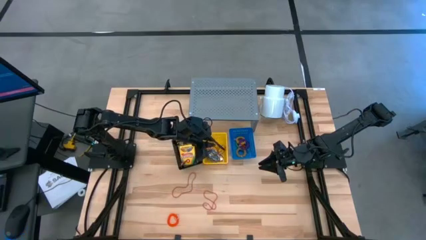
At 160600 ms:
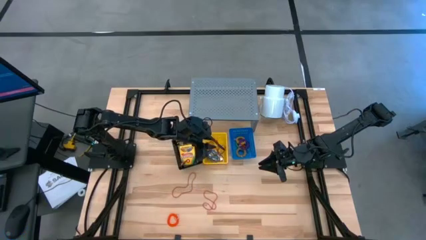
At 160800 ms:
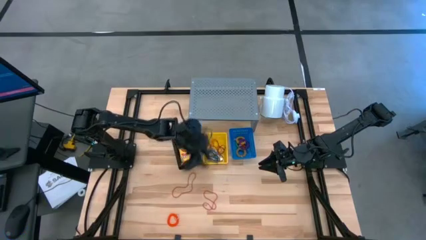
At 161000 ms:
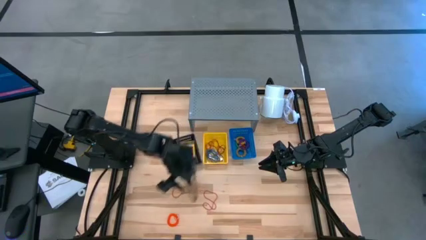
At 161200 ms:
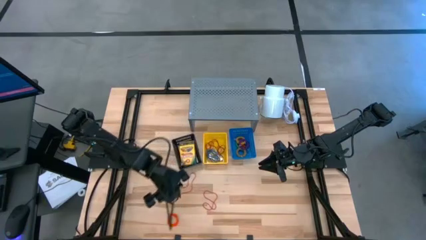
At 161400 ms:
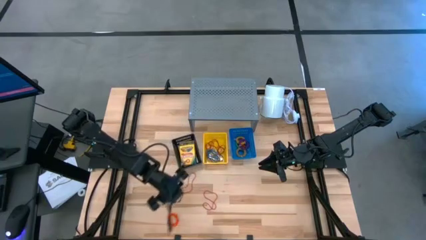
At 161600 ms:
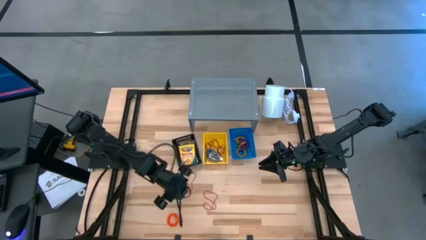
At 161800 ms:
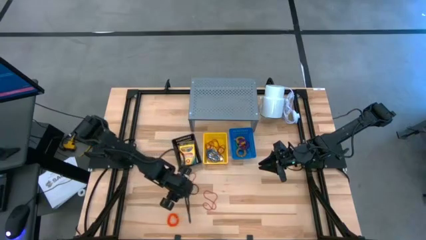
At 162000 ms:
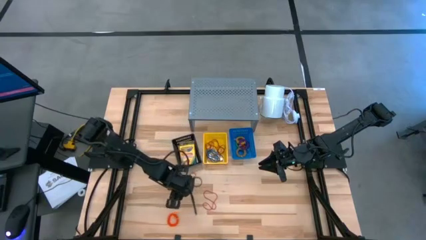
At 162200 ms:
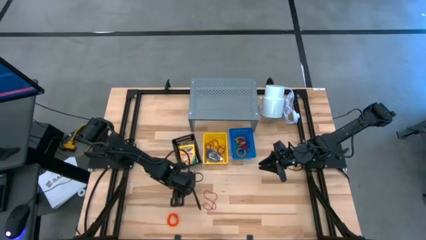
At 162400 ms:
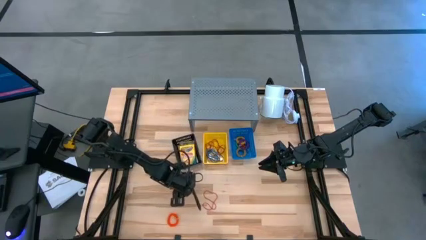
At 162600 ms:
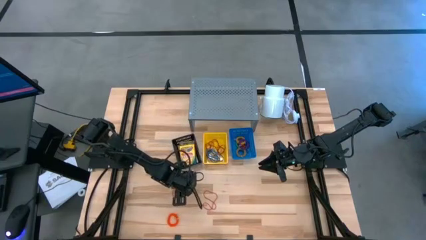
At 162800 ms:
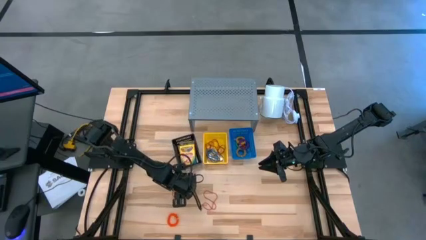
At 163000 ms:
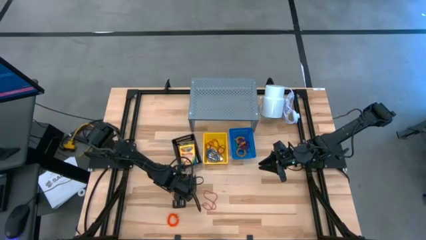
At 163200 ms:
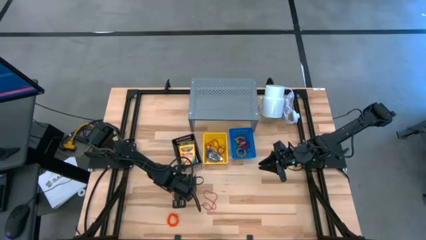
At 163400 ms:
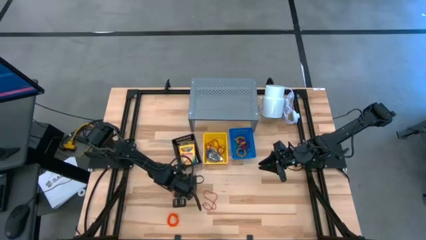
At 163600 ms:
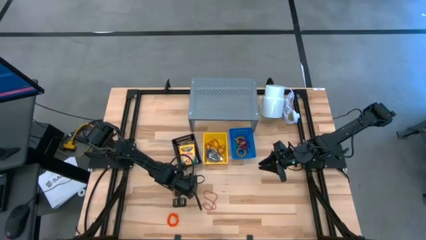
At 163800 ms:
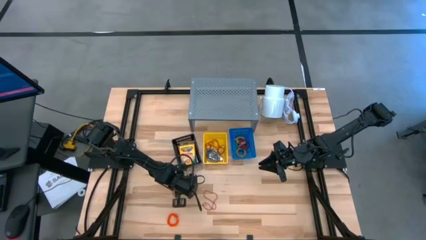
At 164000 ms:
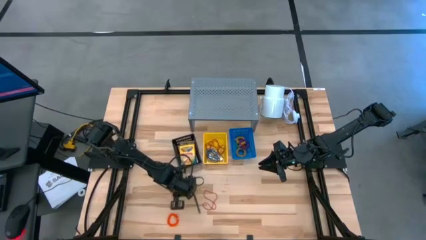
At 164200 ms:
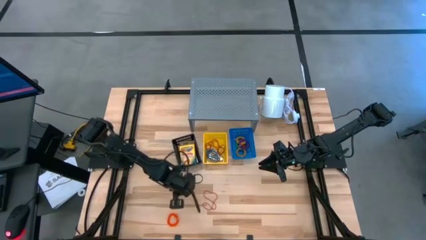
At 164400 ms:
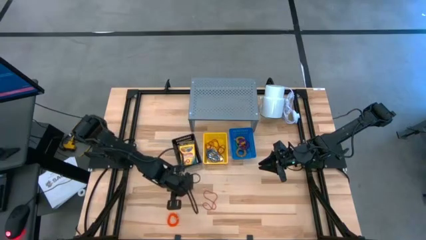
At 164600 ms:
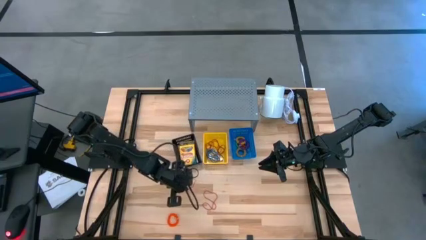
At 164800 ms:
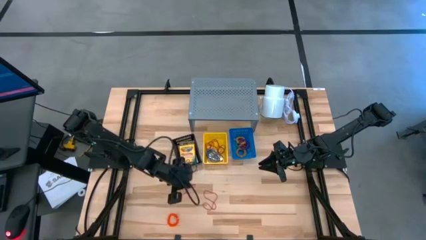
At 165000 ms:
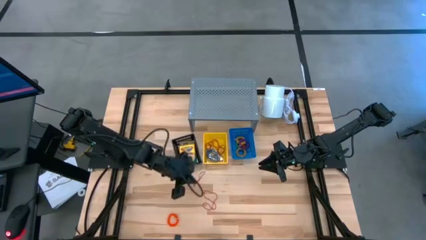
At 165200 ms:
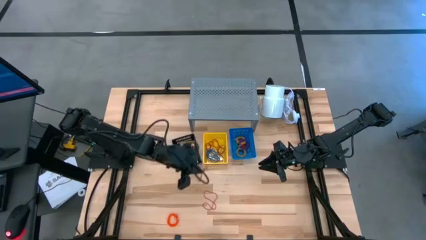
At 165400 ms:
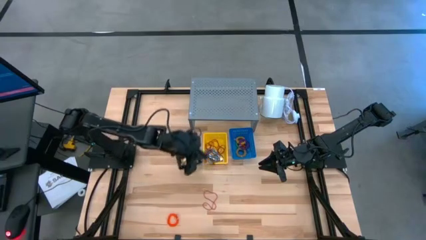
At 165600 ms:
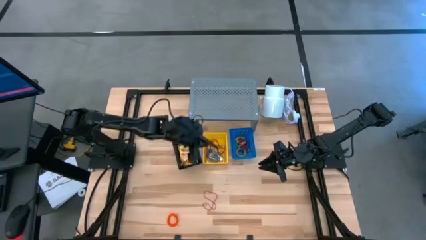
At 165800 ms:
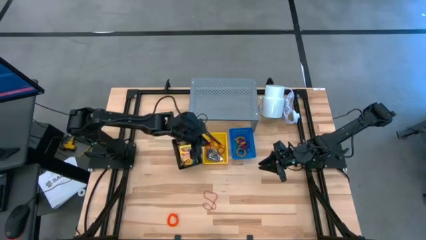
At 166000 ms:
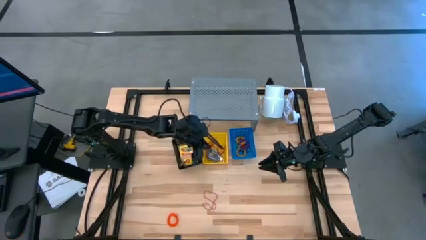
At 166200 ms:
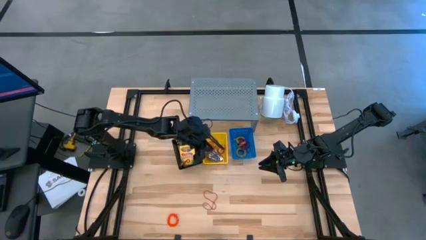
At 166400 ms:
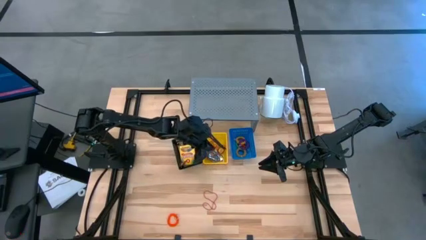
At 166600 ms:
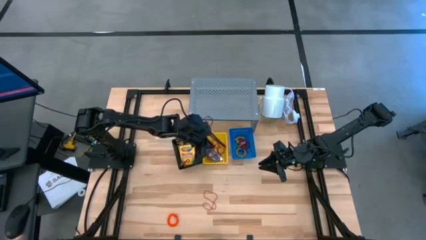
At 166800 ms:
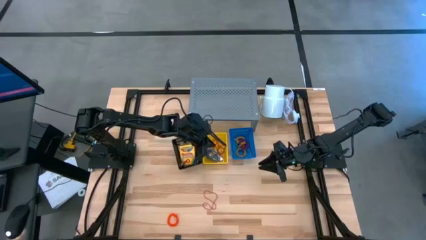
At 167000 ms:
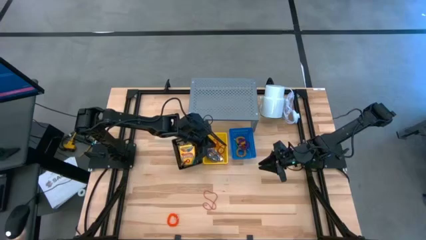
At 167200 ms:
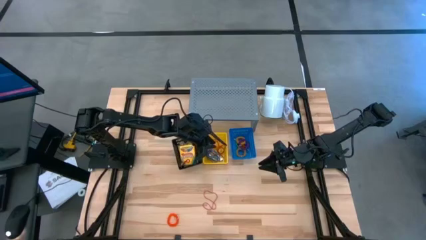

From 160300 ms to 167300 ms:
Task: Pick & Place Office Desk Supplies
Put the red rubber band into the yellow basket

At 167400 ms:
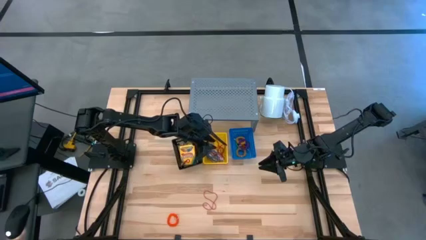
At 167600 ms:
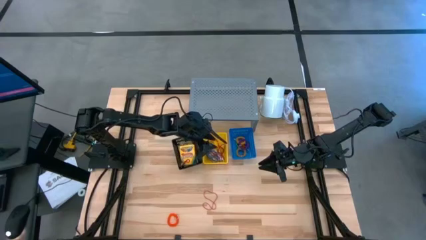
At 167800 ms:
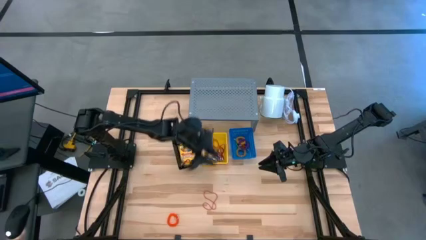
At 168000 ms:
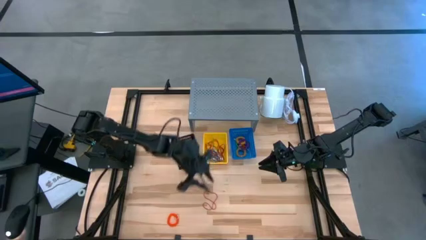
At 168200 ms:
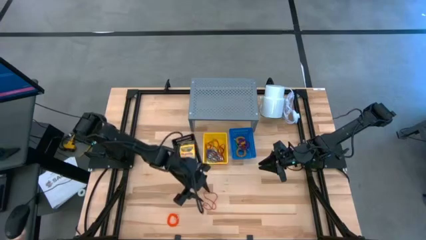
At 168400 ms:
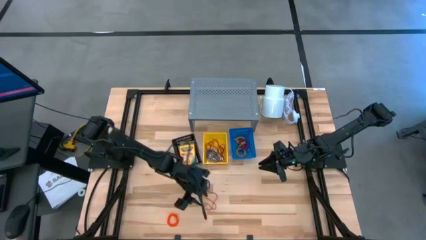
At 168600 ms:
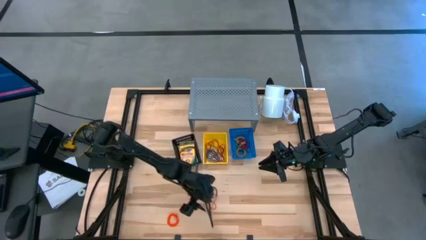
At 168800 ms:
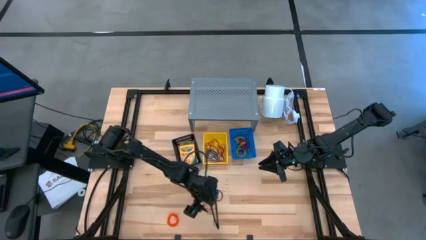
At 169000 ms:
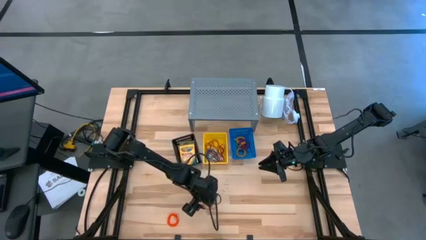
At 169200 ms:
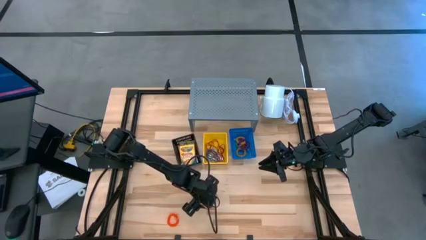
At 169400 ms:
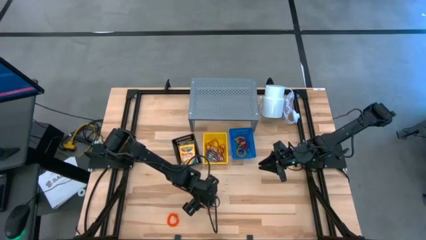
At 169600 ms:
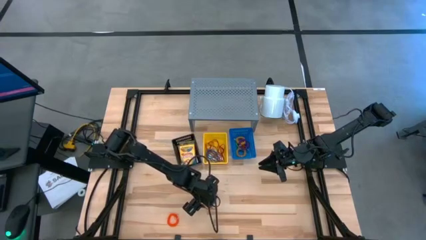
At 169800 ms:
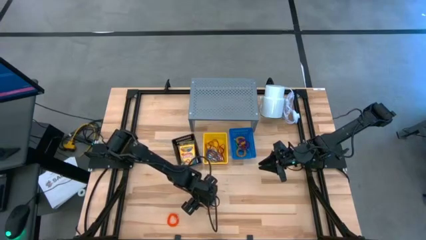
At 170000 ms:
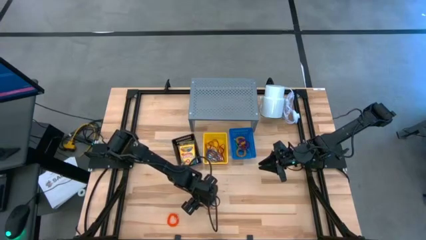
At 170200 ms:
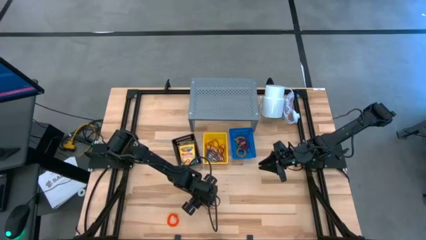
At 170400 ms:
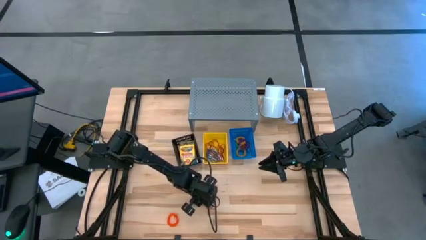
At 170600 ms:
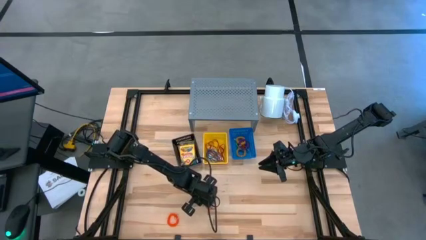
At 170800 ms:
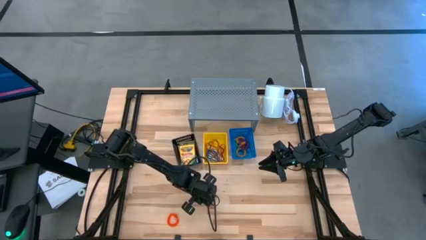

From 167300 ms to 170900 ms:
Put the red rubber band into the yellow basket

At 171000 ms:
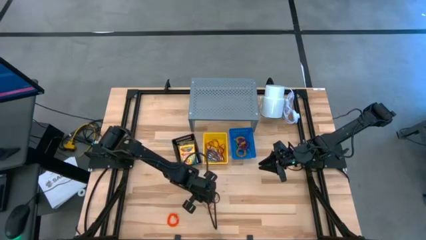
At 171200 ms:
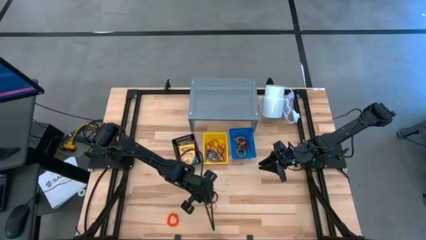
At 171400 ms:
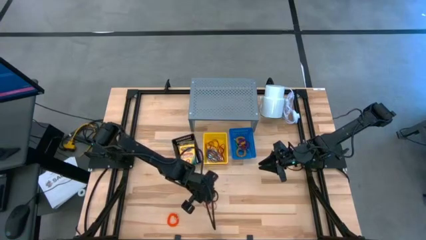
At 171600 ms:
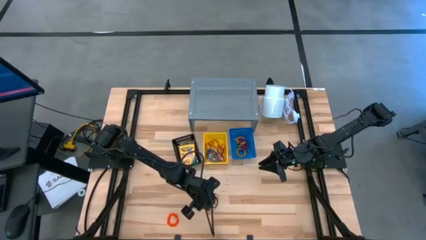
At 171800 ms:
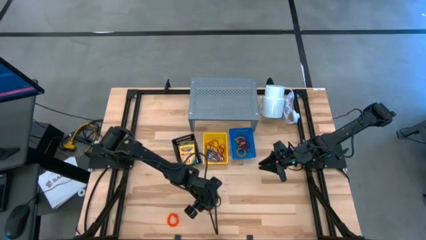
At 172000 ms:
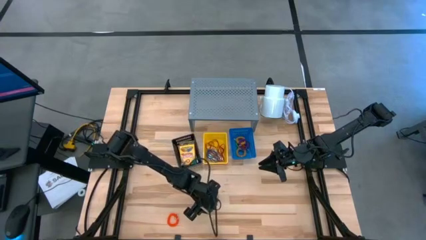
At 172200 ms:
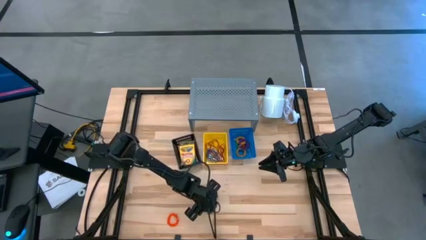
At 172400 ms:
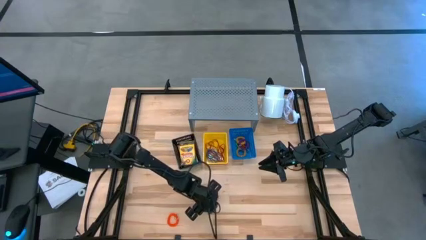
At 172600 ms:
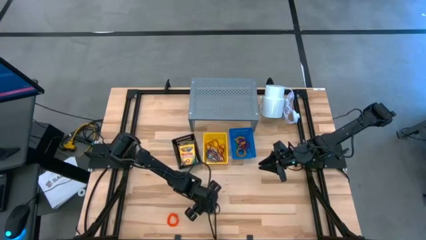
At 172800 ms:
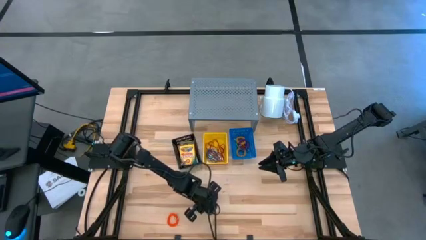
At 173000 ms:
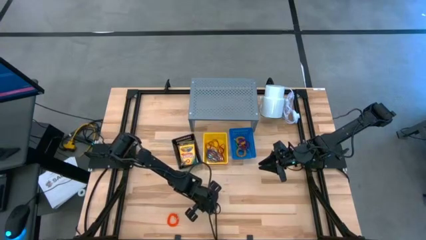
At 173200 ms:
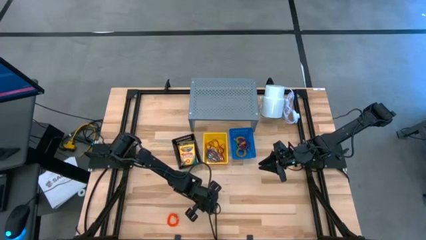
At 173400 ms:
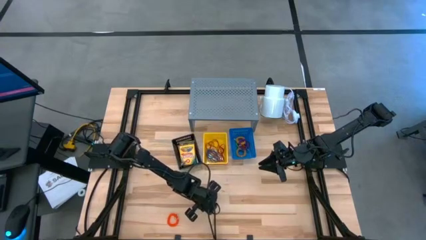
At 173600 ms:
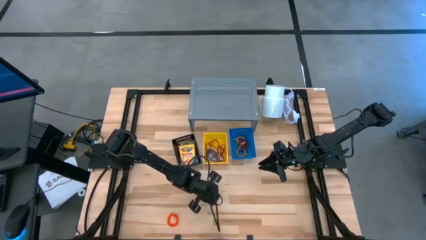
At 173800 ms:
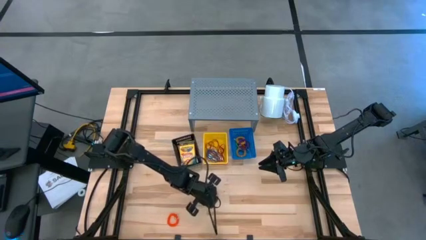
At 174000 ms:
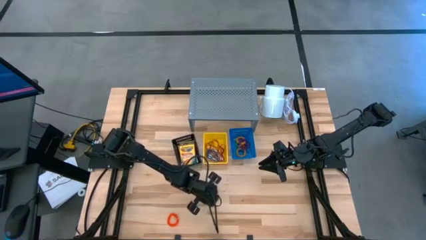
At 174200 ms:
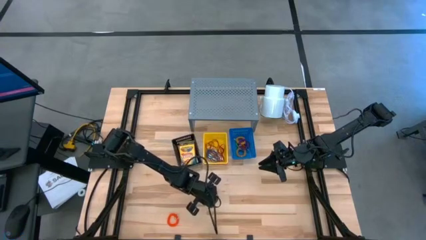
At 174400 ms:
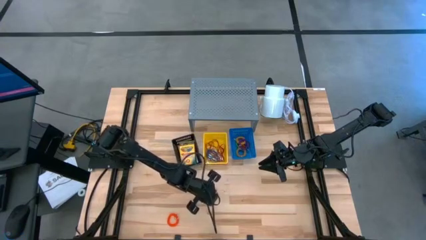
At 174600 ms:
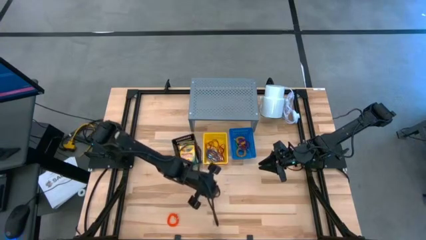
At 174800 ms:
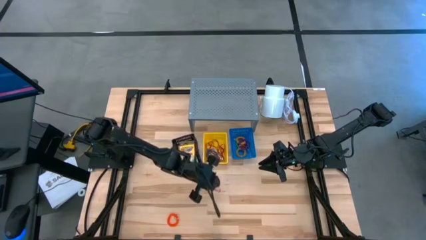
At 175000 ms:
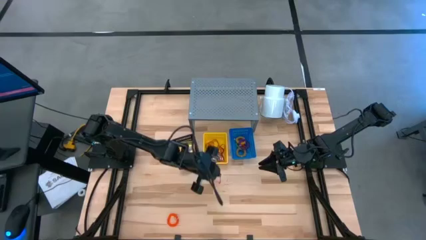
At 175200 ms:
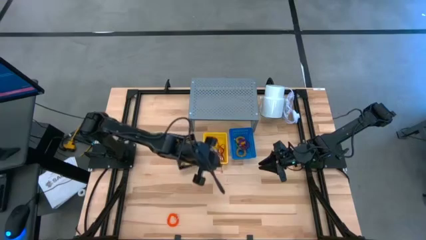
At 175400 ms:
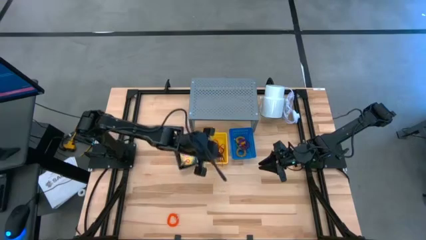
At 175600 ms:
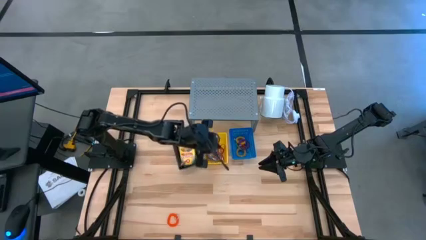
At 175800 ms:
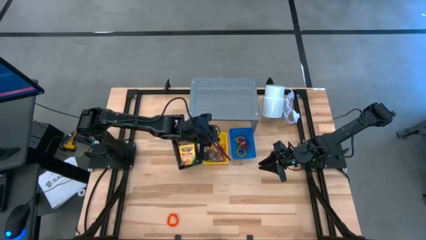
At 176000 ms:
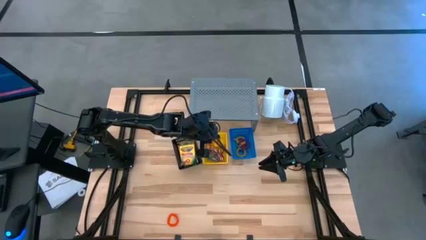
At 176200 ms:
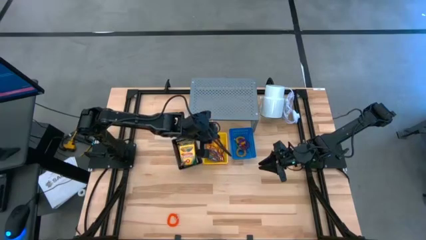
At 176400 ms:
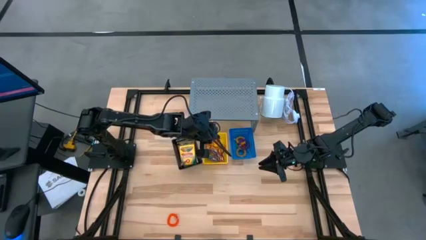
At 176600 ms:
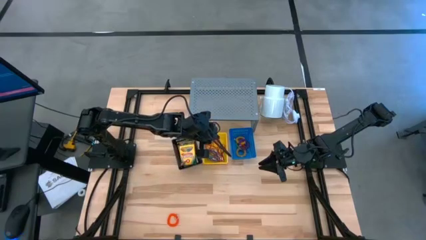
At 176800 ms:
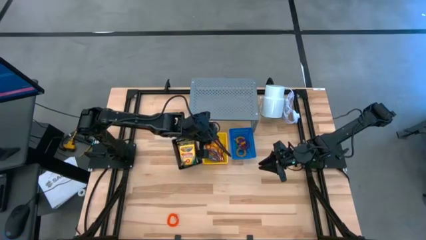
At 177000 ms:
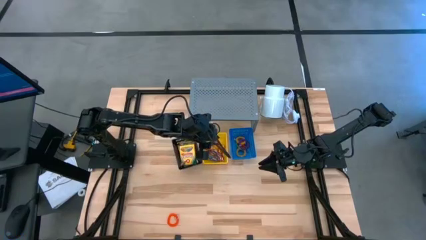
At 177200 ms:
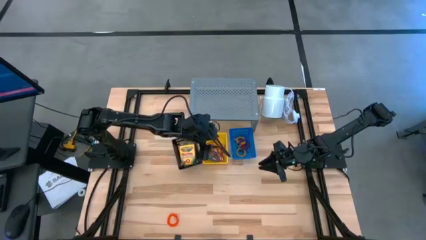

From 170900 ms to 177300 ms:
Put the red rubber band into the yellow basket
